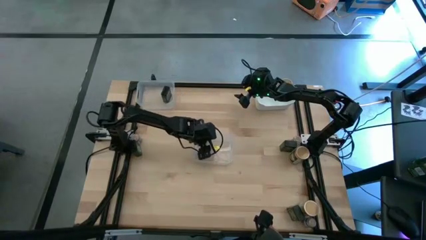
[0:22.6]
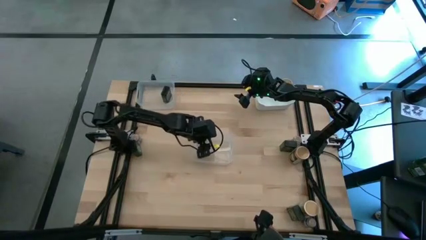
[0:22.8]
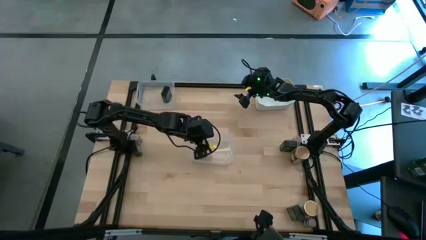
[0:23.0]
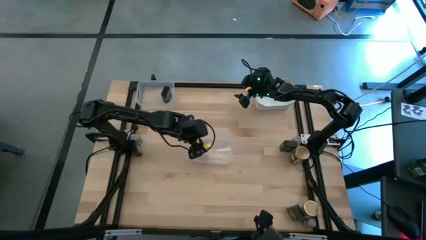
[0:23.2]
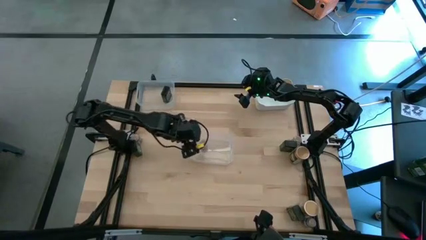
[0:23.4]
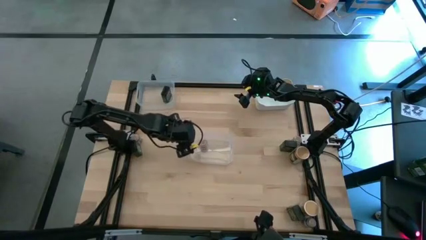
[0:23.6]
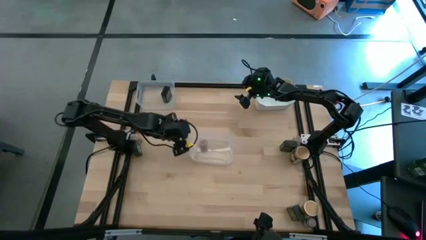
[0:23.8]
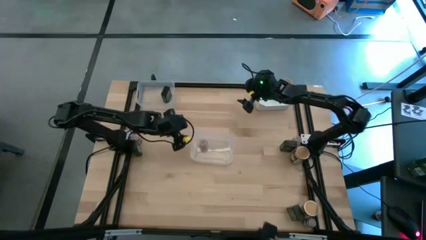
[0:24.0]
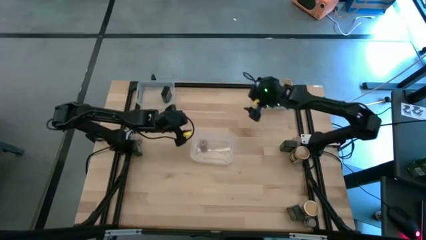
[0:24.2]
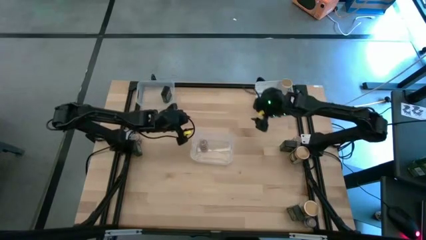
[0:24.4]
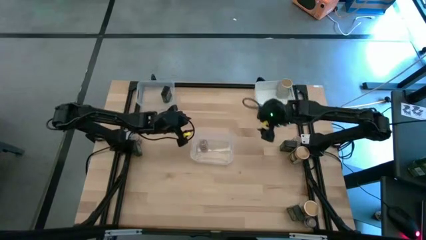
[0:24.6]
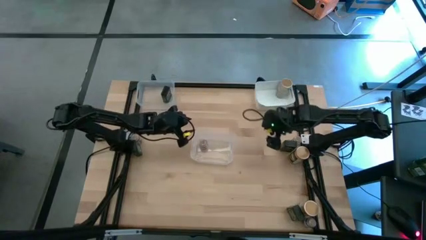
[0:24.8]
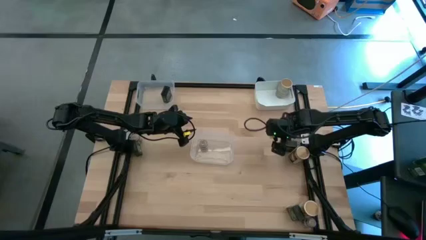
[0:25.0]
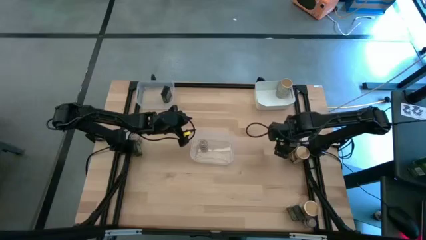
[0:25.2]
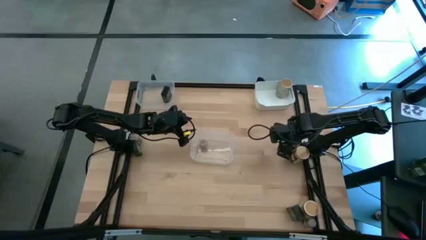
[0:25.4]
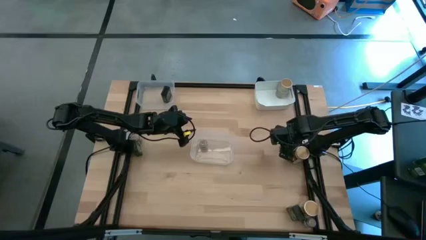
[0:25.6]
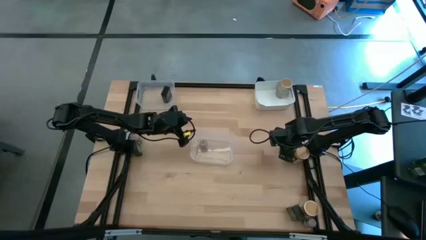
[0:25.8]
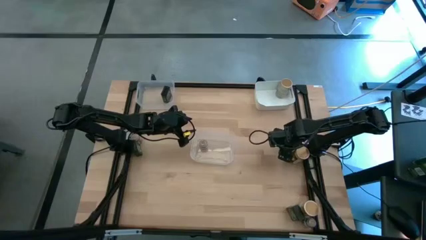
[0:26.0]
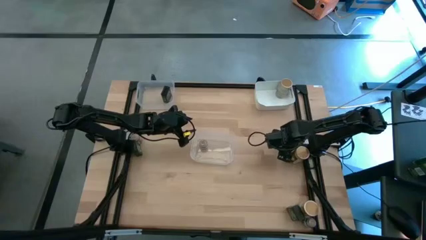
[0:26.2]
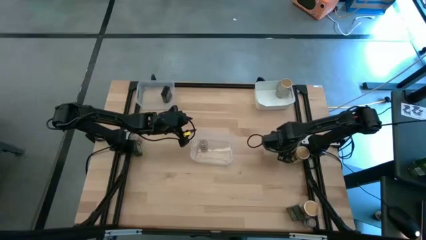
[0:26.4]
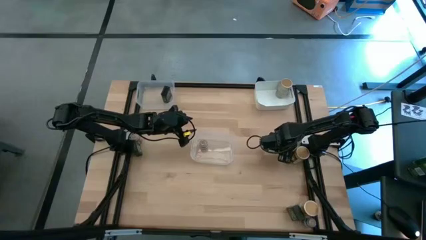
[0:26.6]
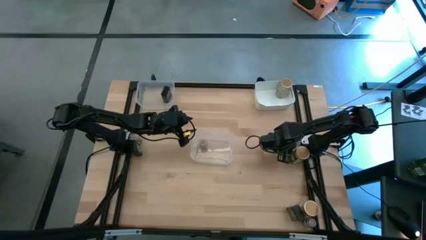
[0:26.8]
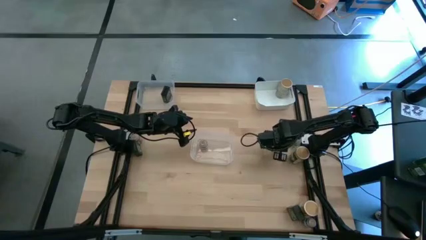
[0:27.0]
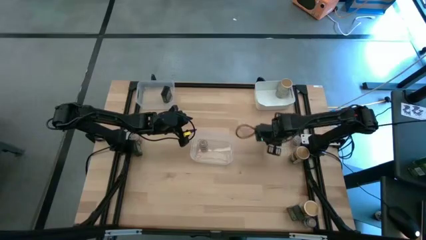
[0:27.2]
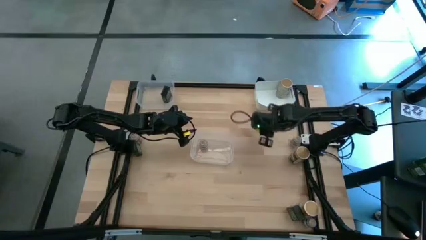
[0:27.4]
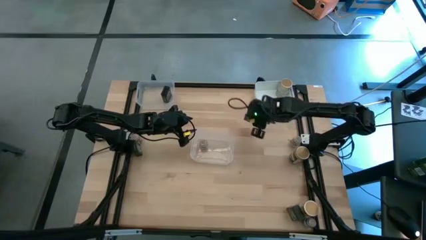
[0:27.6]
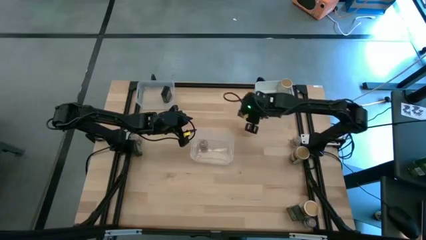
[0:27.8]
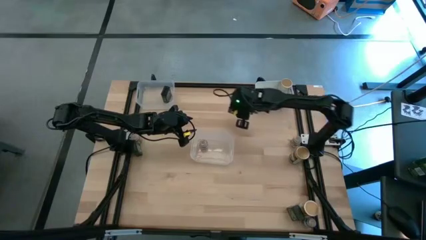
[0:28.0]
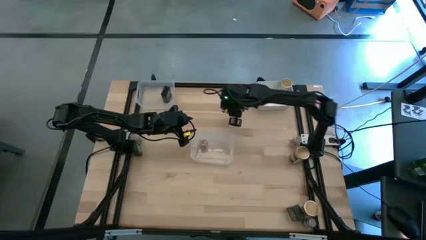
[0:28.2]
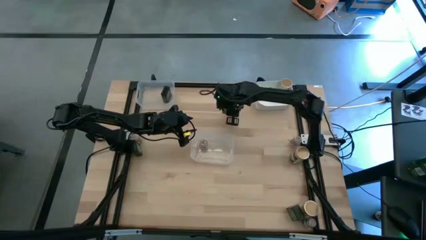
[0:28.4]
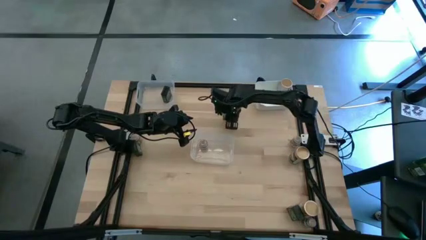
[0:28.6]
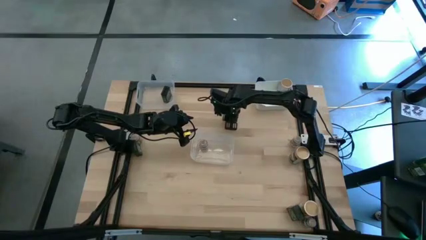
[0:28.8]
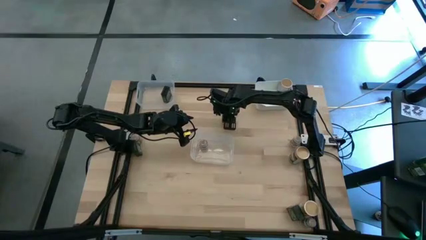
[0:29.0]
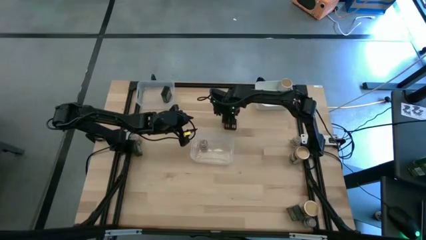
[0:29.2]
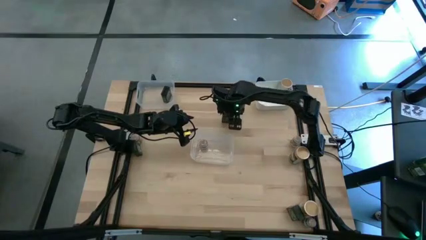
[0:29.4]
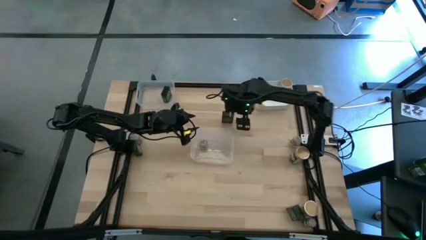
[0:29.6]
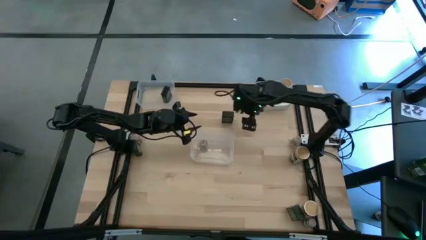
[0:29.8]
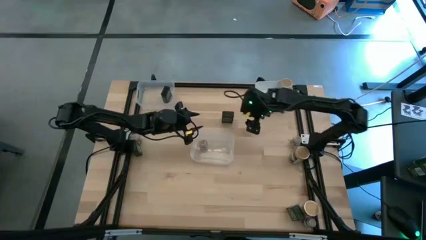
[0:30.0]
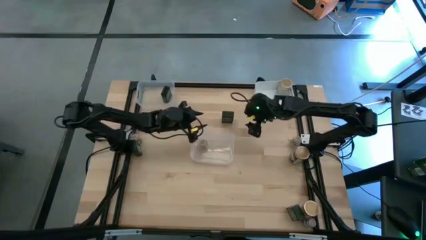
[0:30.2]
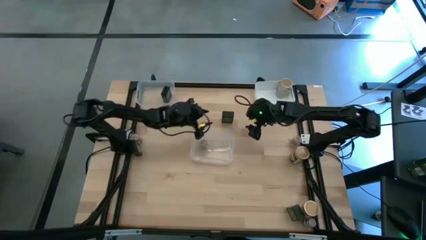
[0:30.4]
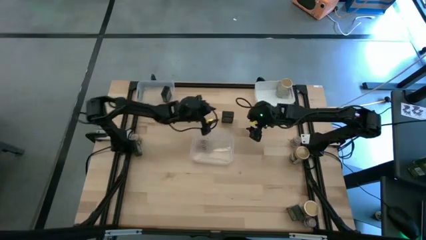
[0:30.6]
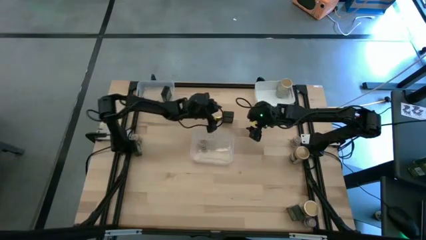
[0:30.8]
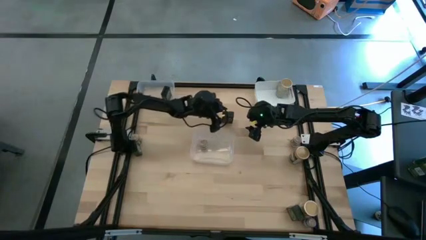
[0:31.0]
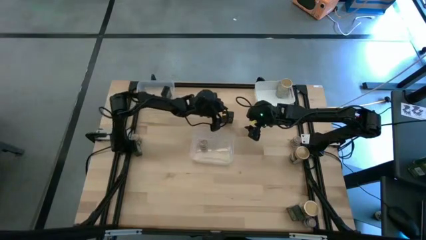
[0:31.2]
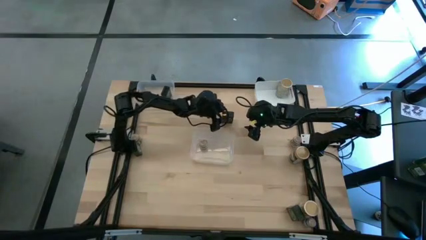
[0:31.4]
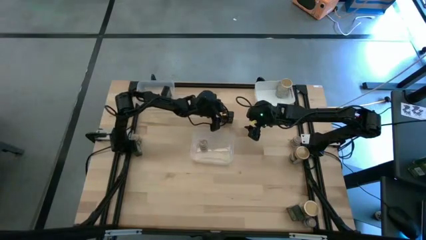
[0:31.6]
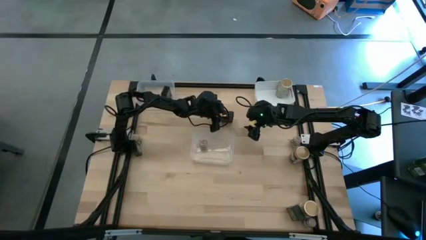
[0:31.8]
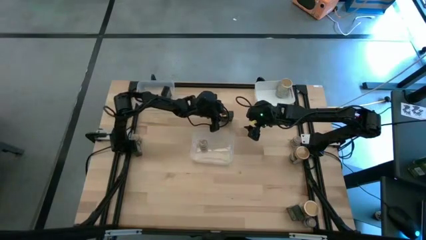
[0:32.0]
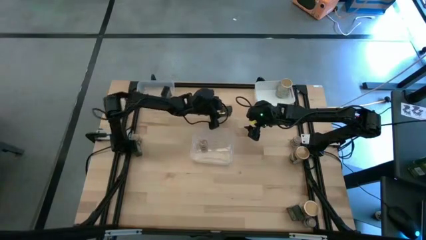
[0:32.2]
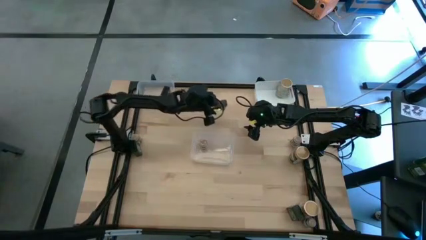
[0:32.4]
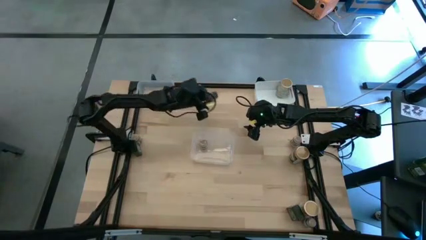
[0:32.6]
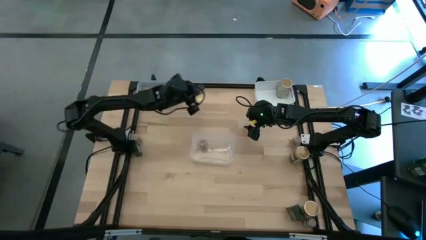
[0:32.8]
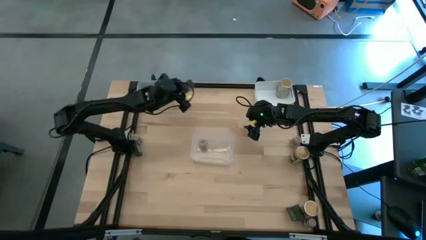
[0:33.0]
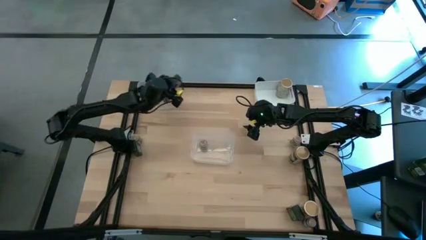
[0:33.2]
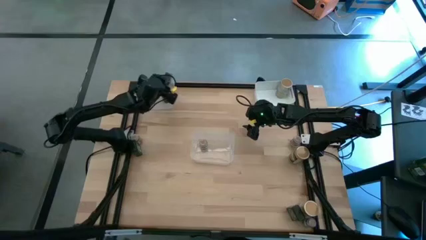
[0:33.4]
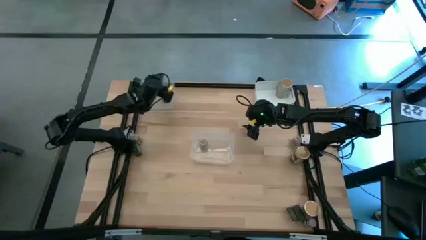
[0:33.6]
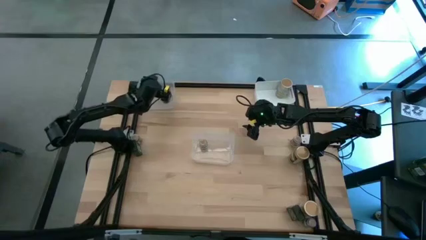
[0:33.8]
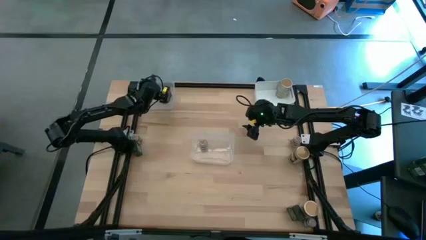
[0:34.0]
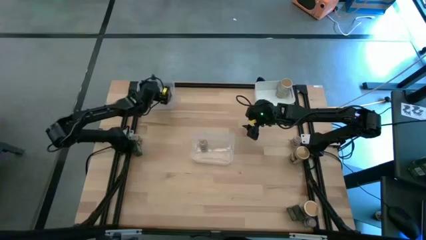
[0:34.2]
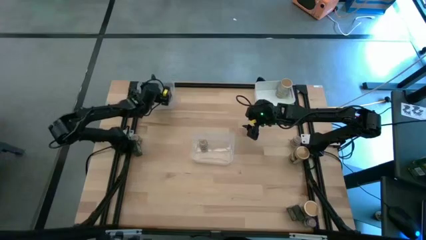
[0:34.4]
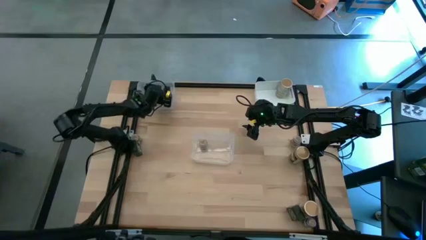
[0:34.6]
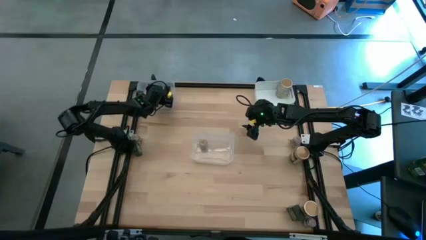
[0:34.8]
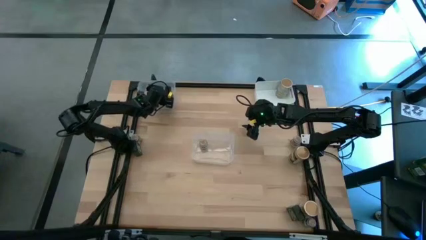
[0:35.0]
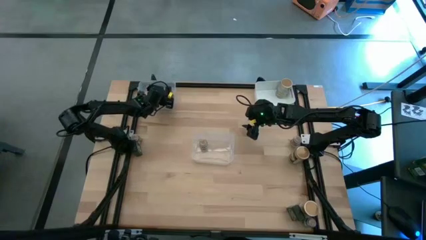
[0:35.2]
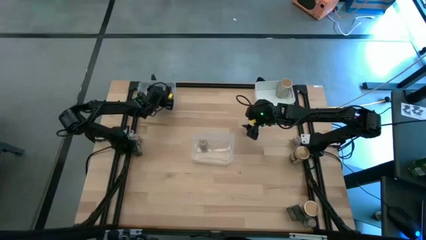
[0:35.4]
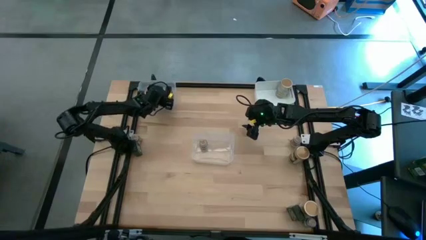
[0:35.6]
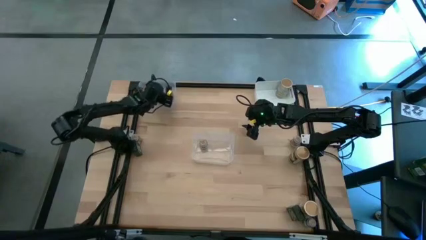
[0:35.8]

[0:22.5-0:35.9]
Task: Sort spices by type
Put the black seasoning can into the top transparent bin
